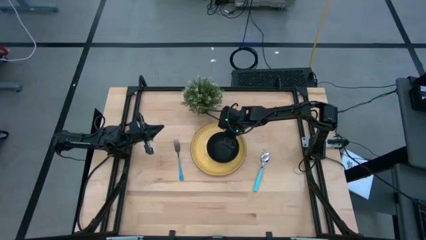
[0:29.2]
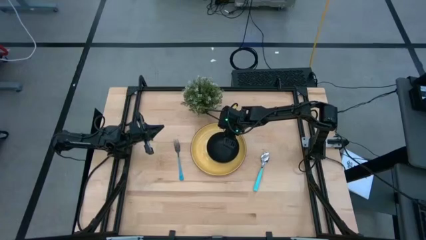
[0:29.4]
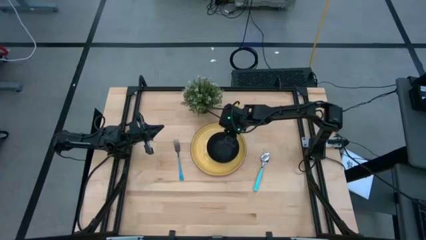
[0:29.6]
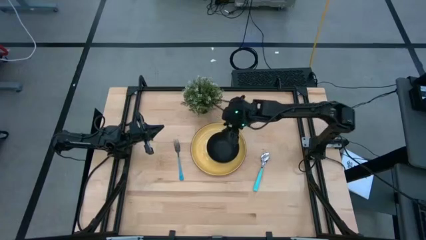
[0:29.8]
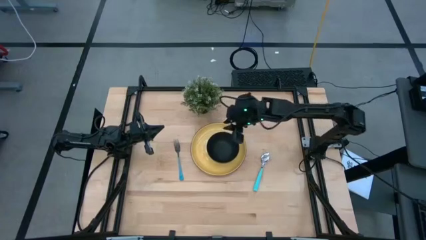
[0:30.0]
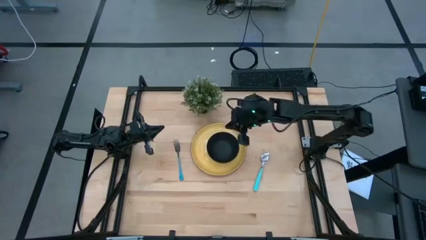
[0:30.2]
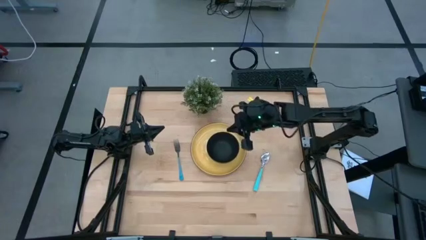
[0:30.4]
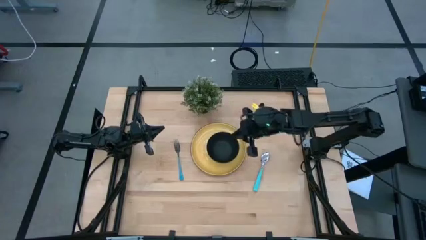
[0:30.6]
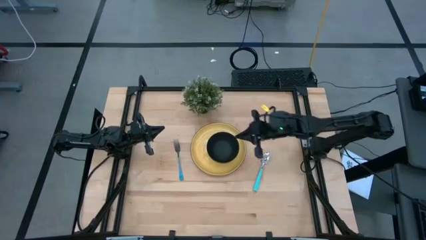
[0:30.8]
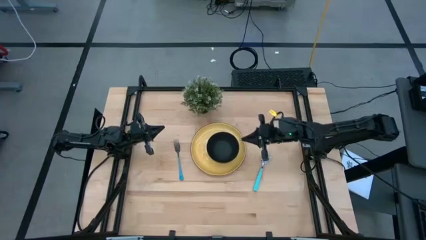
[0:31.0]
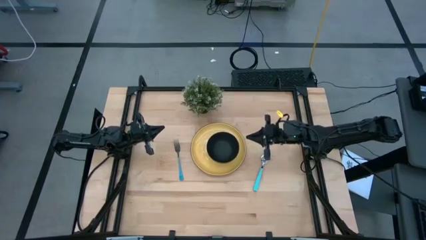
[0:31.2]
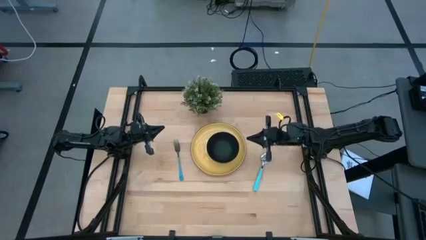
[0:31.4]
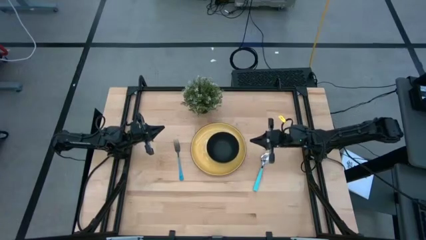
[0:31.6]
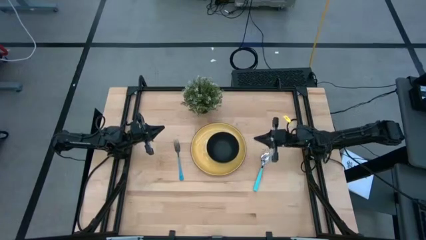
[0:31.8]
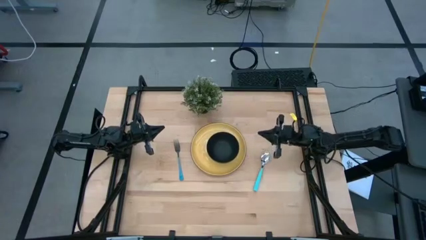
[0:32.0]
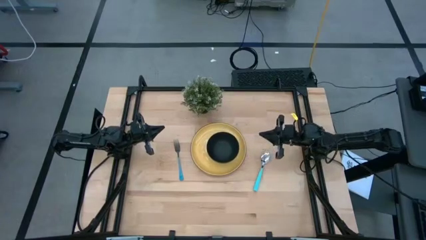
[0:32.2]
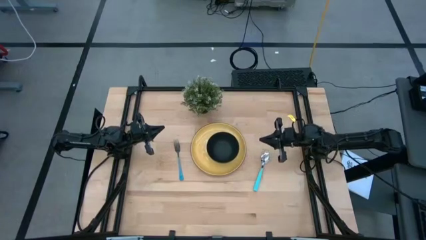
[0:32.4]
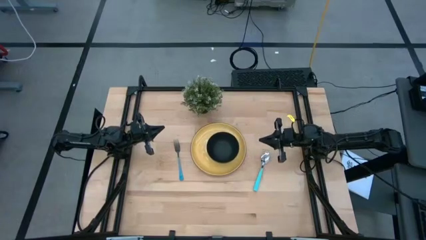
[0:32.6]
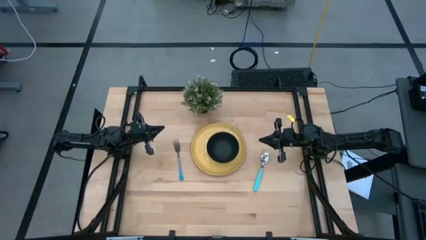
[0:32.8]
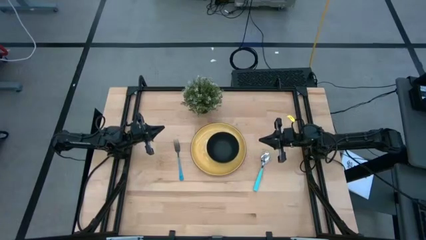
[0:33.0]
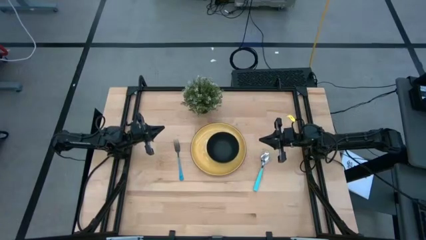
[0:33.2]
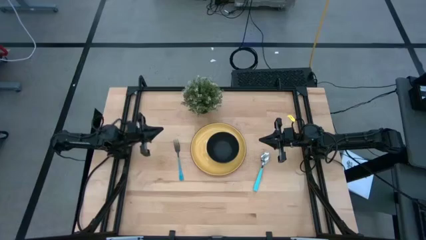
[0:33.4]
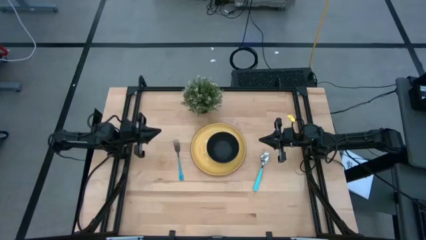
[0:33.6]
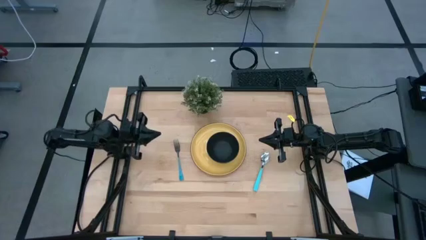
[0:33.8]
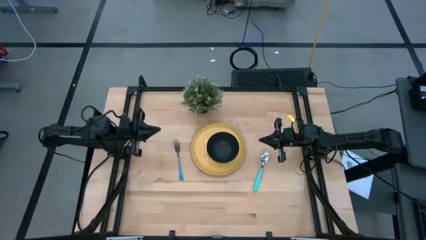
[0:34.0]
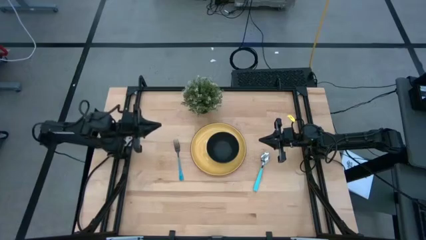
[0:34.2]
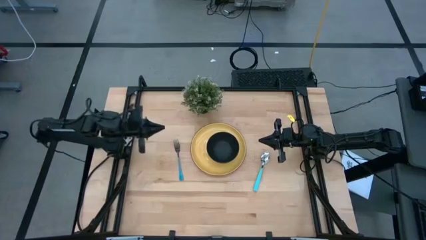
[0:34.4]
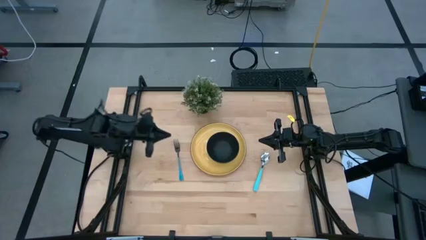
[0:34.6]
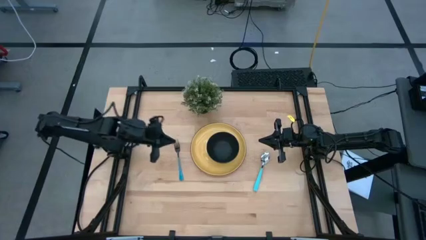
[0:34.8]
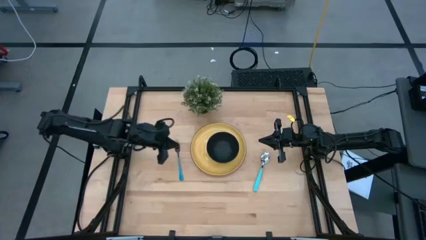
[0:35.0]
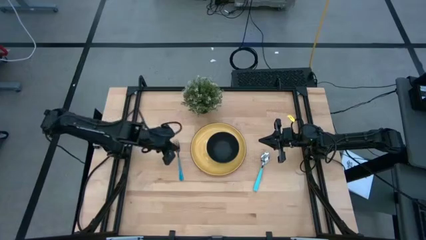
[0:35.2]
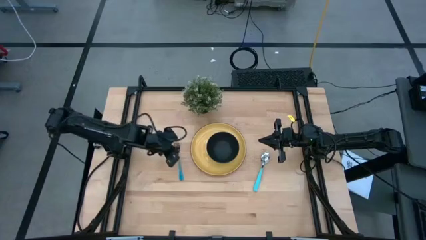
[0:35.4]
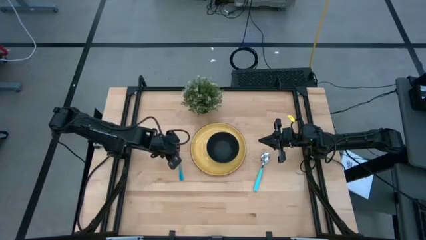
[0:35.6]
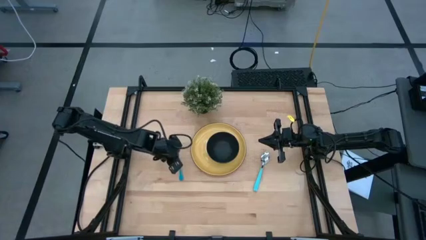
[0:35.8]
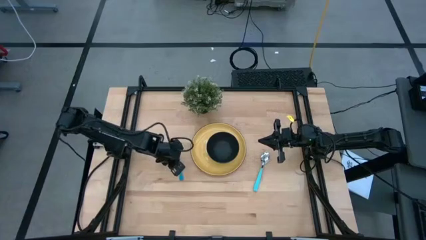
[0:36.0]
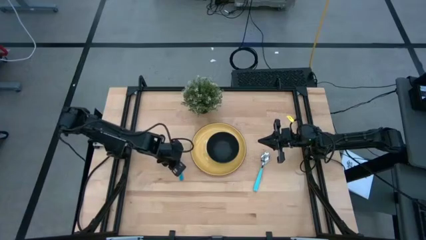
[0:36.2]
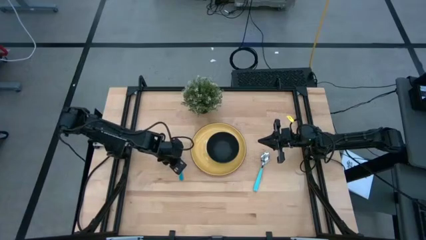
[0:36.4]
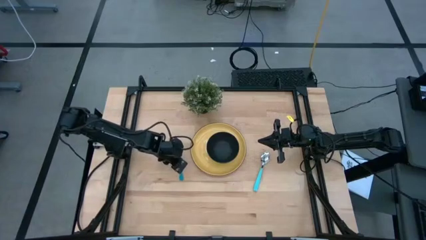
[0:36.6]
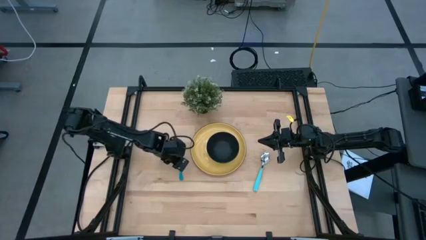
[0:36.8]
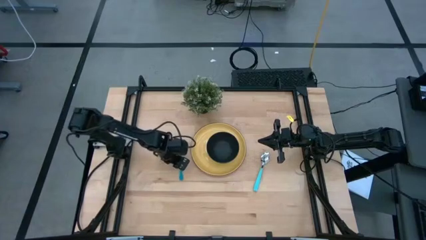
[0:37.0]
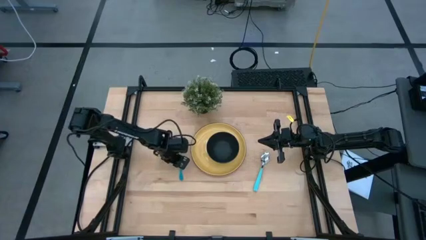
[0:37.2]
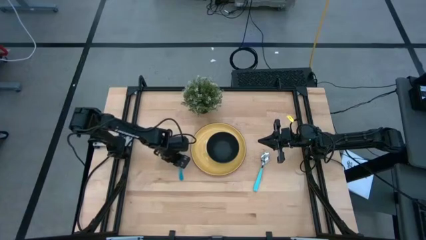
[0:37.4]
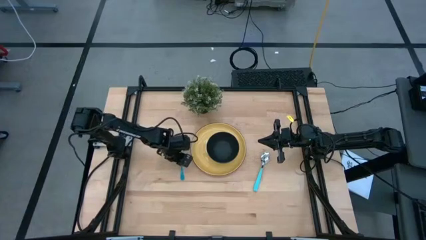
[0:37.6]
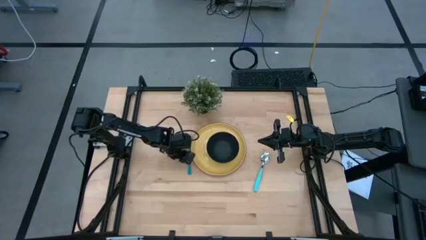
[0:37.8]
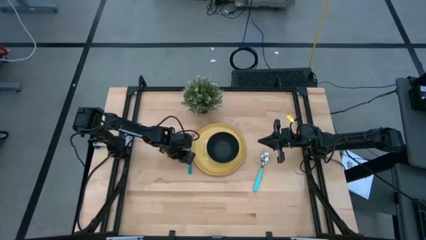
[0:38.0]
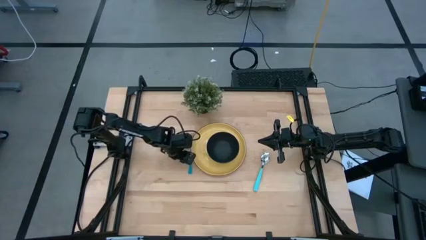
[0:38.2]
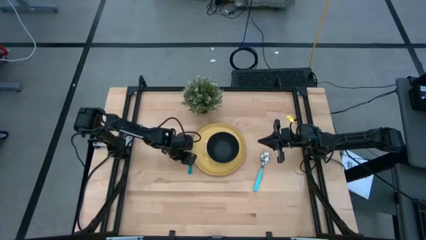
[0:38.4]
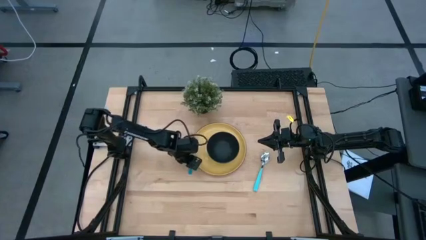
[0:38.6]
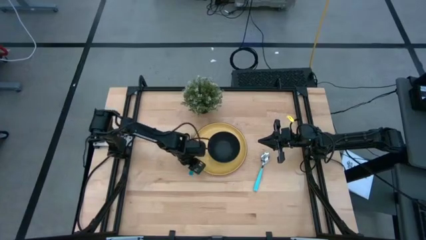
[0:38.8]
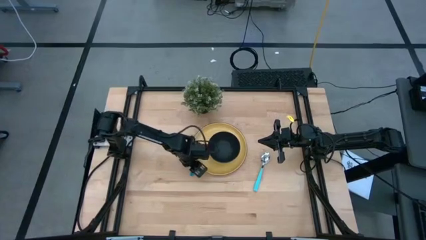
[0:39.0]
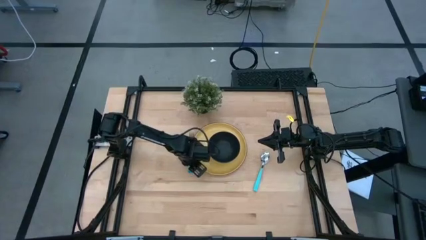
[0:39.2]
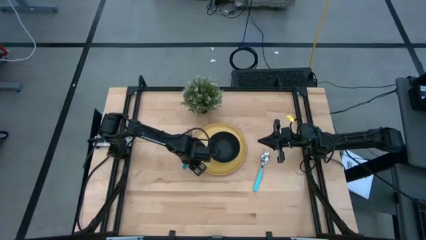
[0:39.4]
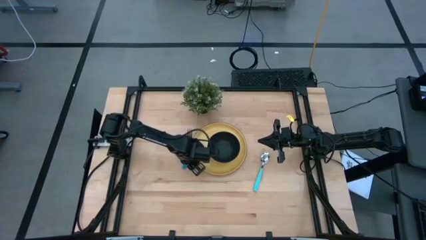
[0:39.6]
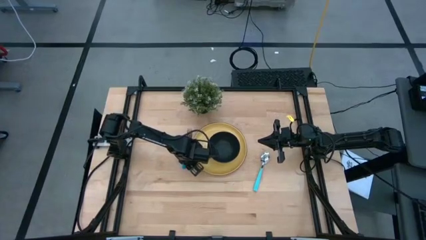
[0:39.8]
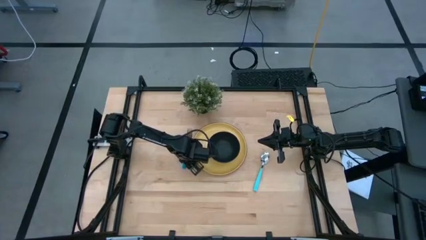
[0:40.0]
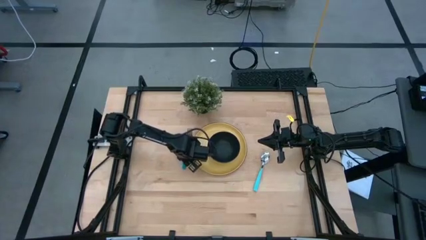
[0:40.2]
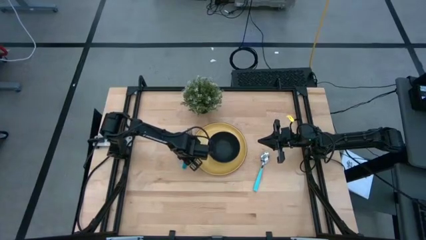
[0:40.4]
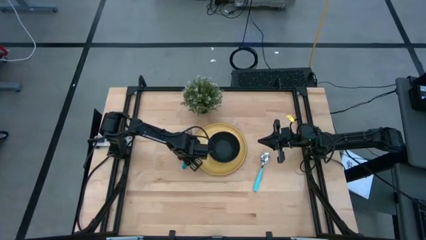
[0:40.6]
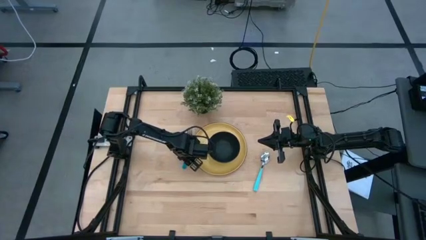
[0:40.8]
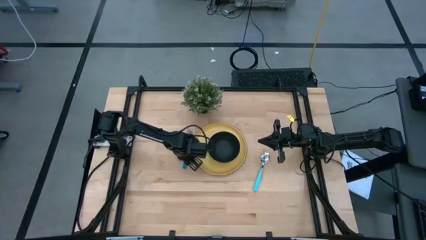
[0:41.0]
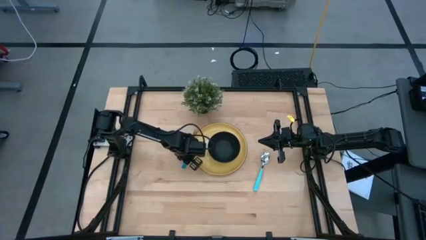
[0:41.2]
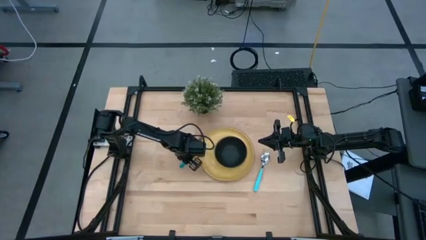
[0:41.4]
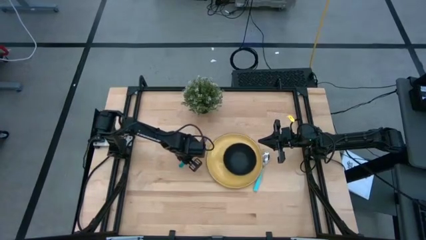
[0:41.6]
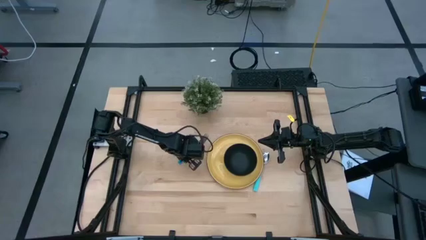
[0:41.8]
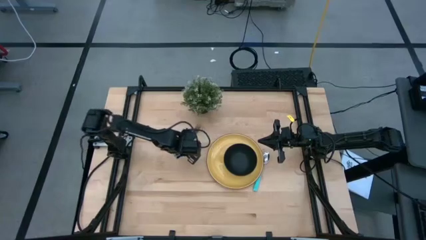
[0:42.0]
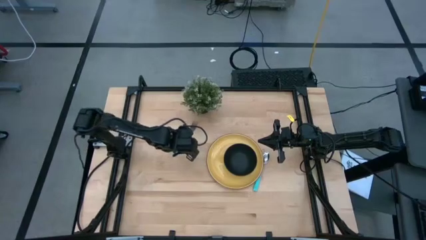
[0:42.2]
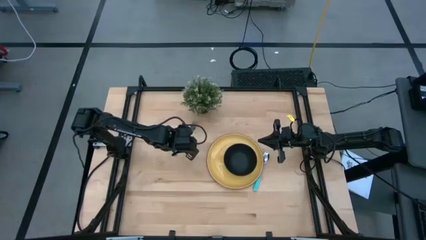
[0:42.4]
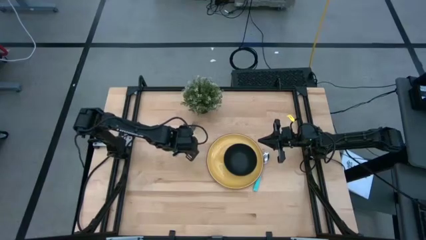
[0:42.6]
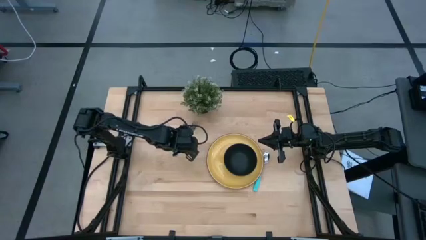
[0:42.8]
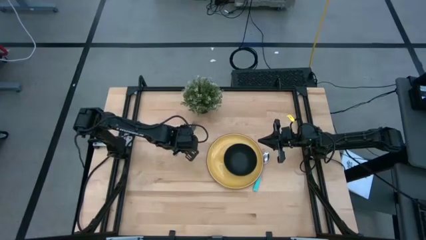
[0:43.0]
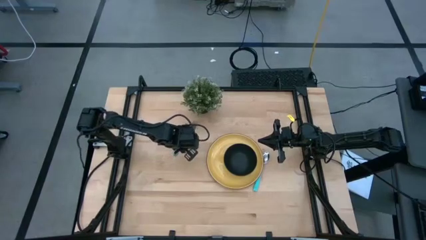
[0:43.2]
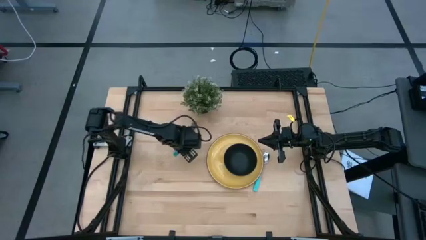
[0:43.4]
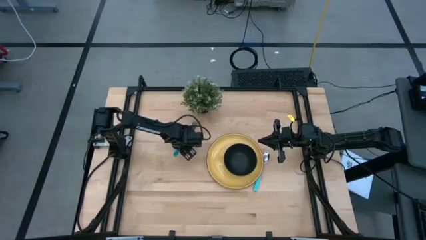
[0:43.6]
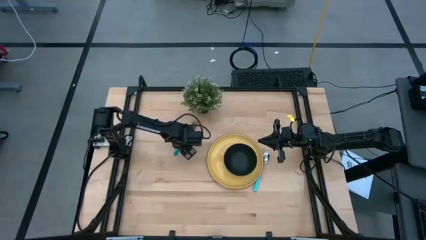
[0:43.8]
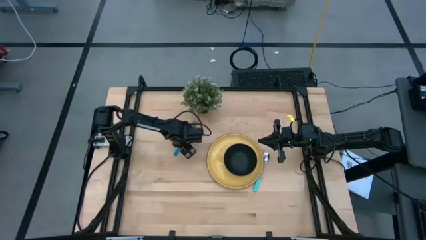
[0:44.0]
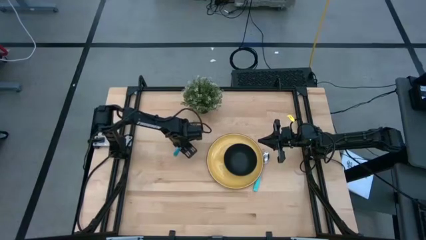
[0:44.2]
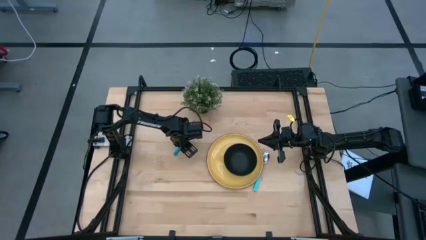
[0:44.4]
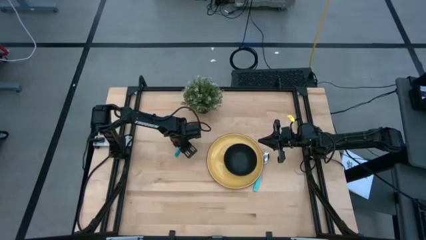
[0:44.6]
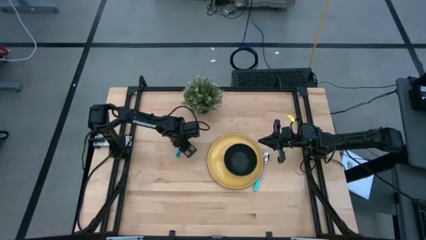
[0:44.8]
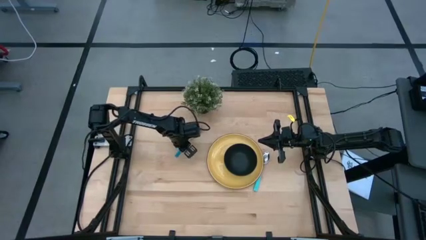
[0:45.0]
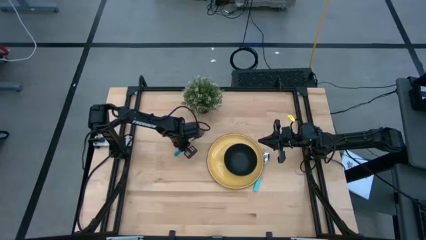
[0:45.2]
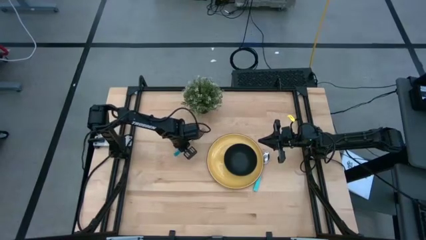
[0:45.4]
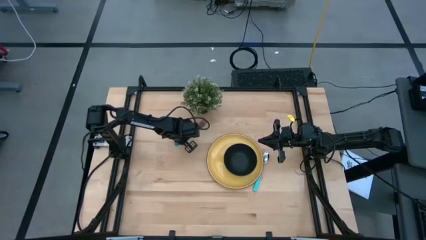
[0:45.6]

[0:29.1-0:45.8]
Task: Set table place
Put the blue fork on the yellow plate to the left of the black bowl
